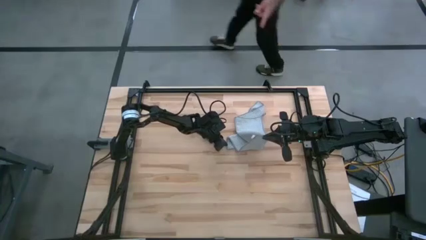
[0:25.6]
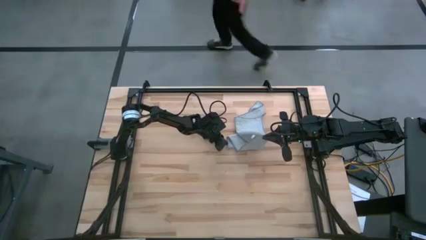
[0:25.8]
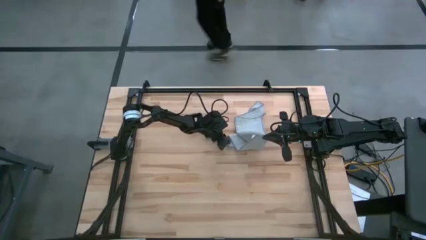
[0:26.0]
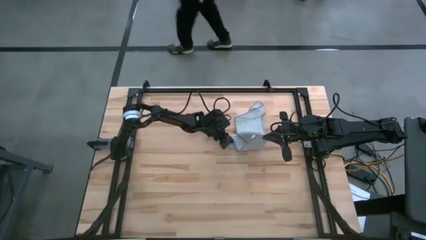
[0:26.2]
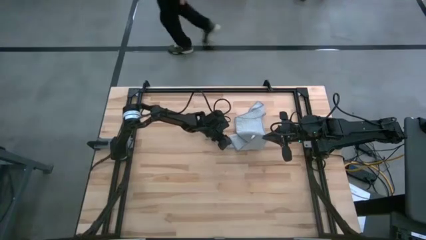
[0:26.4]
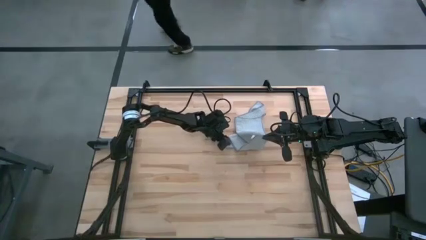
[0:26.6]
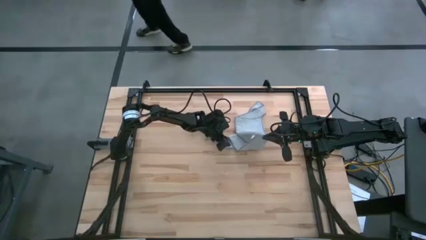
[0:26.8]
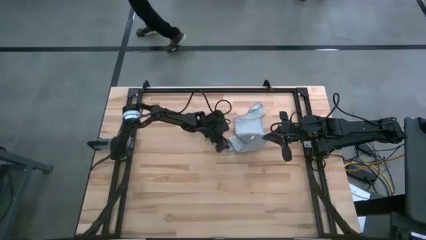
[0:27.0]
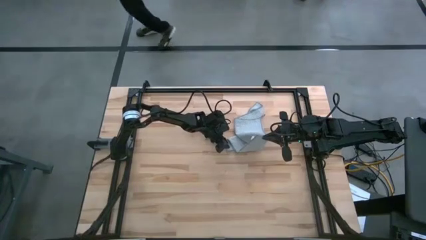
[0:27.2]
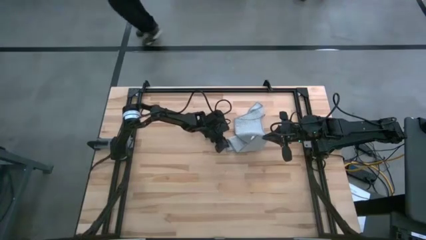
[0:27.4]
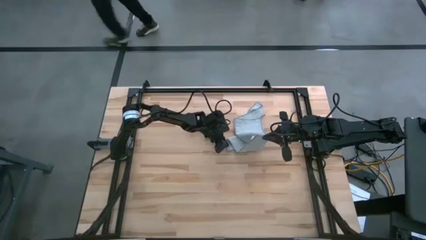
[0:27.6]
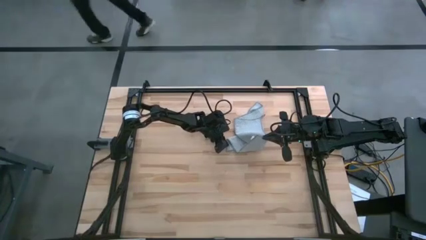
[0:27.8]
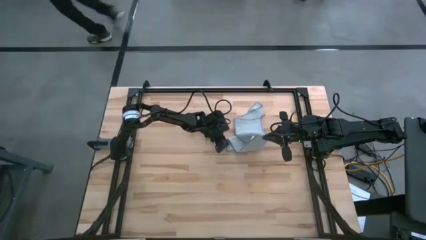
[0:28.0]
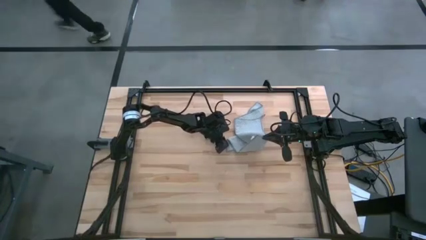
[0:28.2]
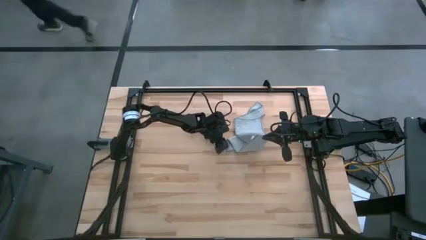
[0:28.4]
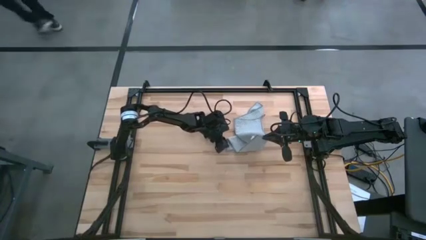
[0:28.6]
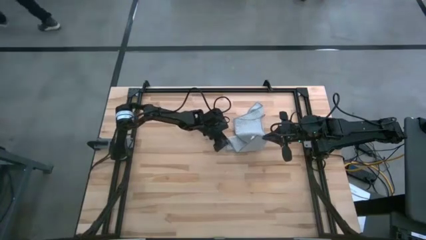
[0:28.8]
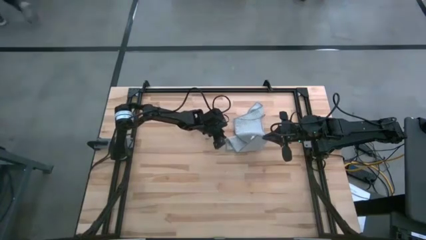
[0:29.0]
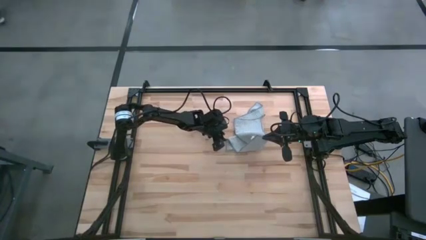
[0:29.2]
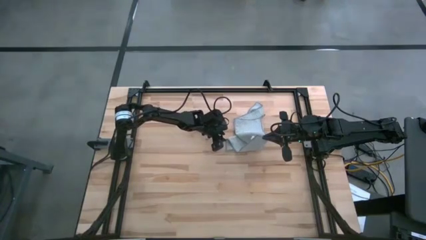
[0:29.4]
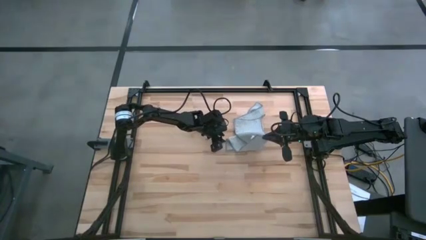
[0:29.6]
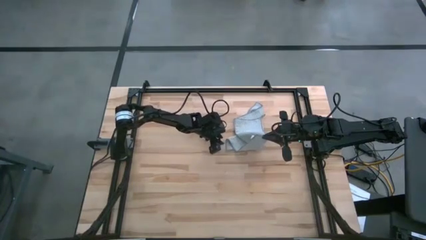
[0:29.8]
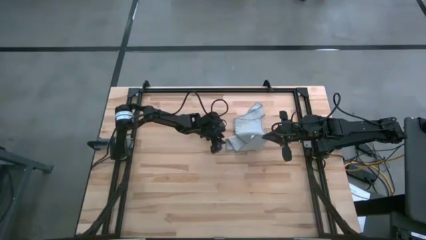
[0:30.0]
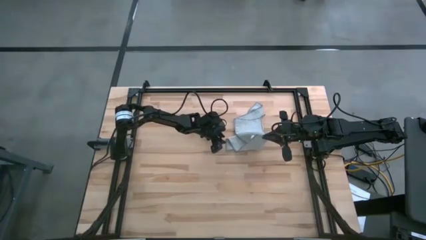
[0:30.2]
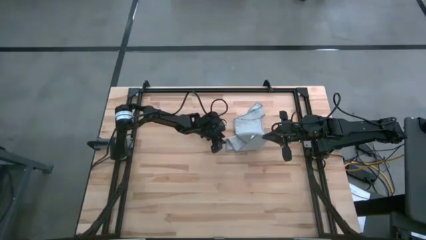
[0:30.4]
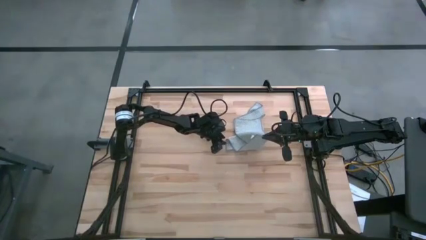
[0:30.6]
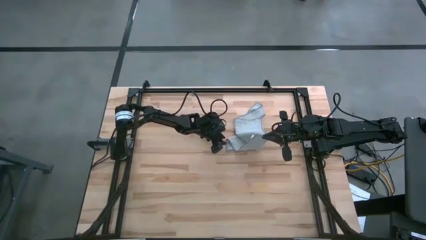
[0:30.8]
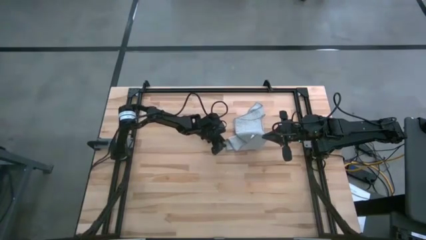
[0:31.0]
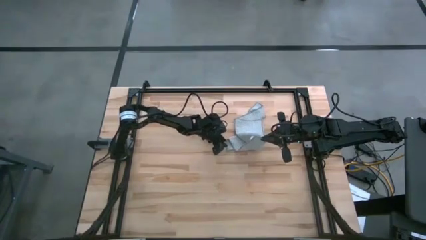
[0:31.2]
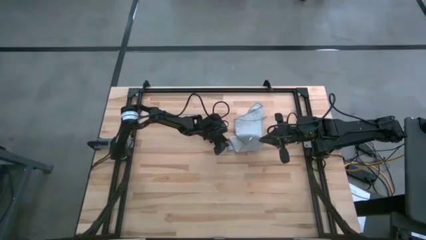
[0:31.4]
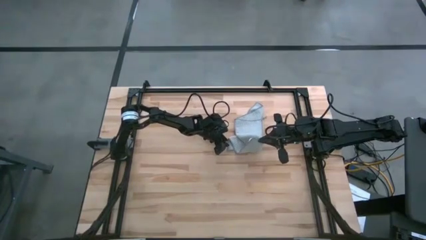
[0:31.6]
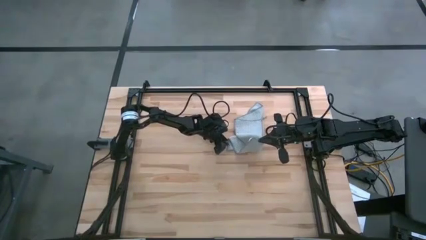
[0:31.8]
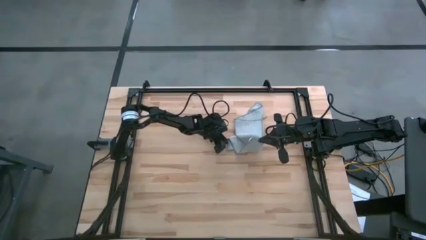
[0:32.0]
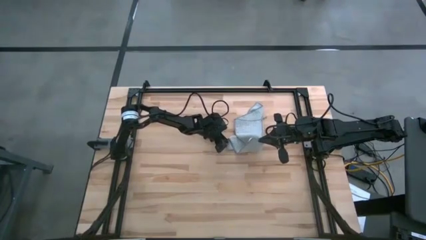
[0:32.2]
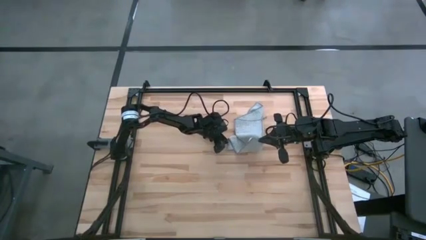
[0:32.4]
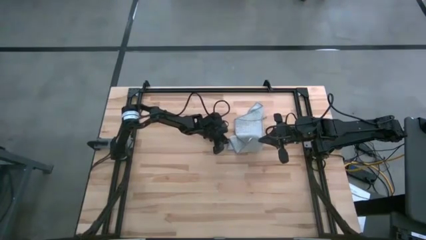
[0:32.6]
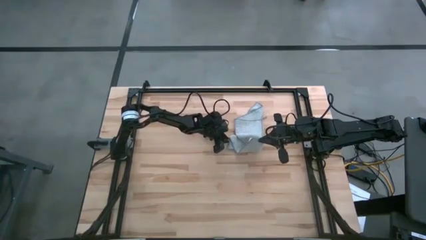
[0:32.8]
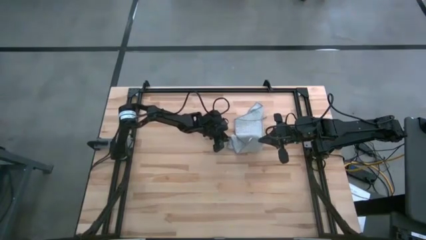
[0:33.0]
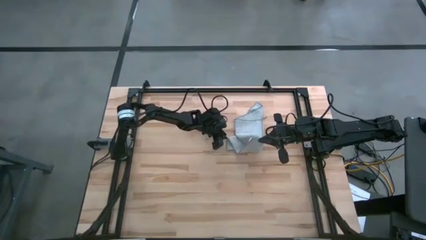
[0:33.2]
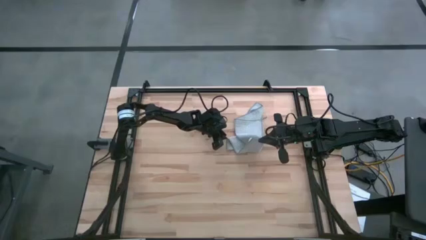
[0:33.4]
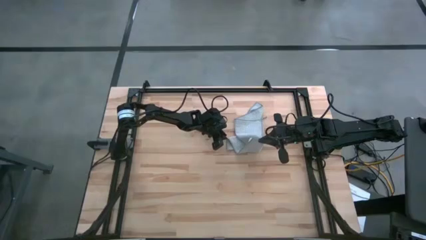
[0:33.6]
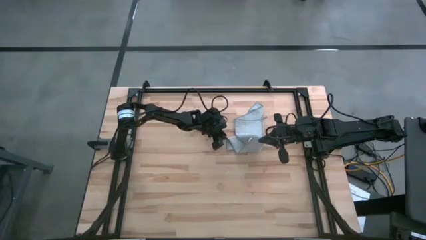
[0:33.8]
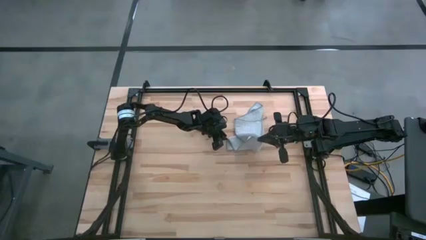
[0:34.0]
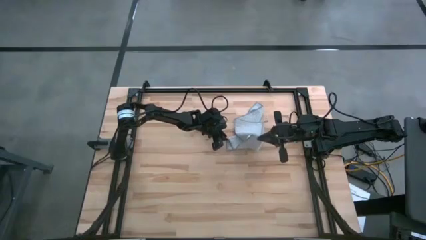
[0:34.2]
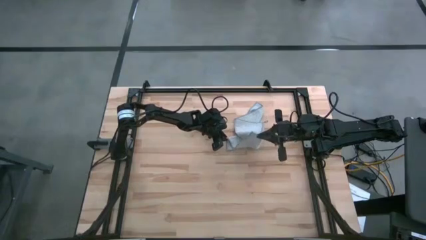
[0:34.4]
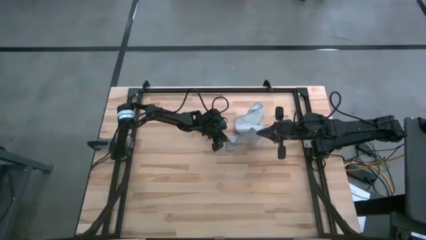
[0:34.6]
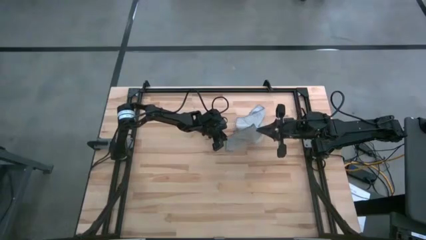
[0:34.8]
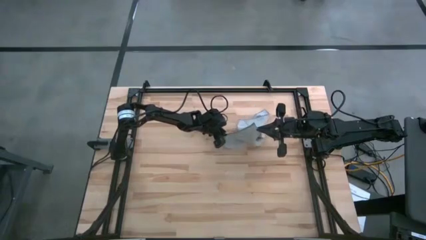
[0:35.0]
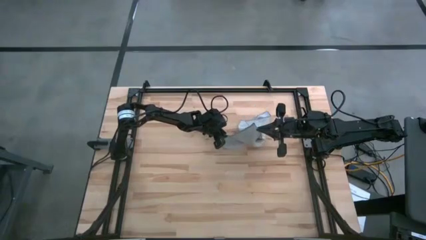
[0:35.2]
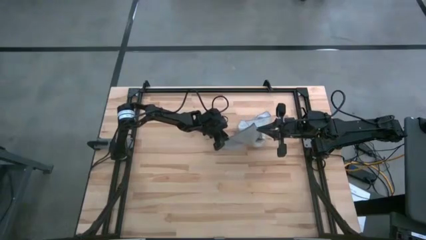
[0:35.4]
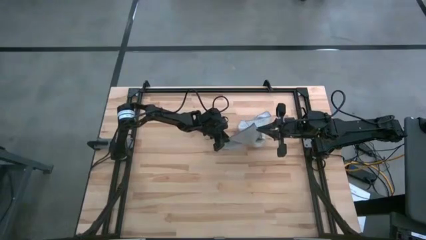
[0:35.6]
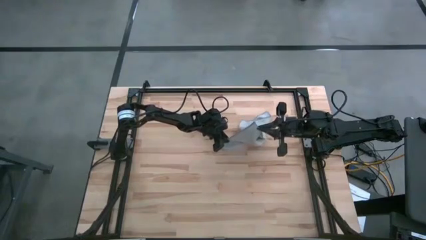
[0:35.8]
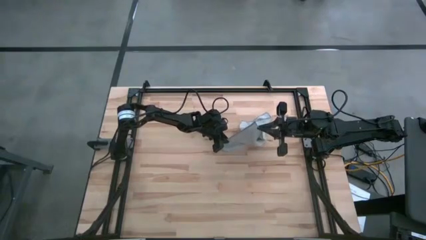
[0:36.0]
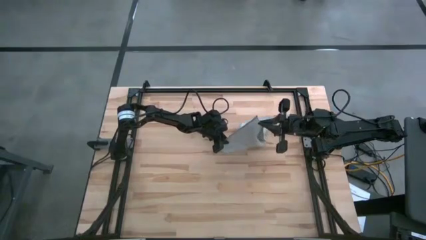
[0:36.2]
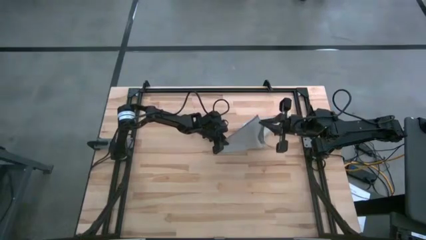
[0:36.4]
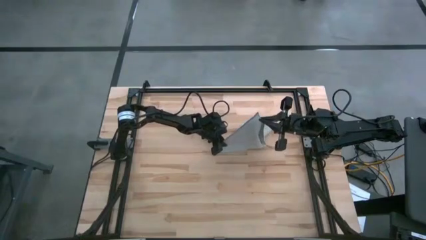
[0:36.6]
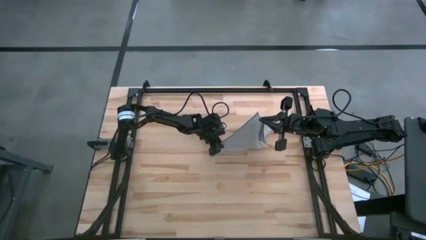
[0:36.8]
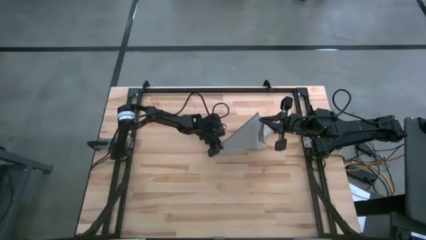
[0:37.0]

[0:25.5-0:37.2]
Task: Fold microfiber towels
Fold the gray on the table

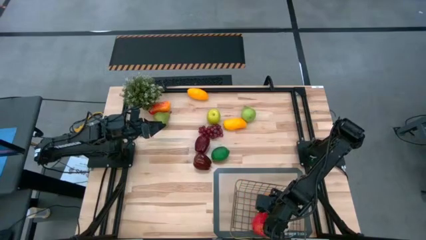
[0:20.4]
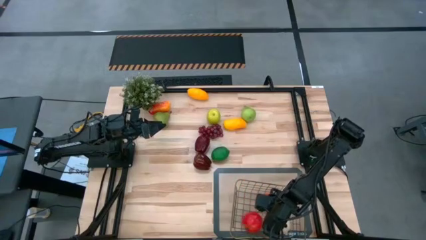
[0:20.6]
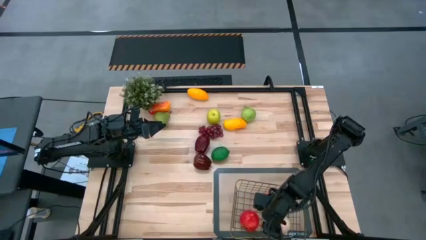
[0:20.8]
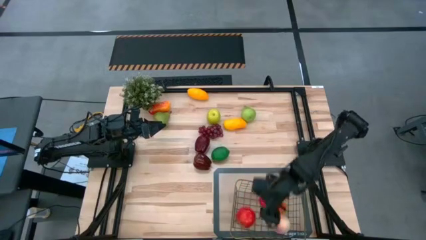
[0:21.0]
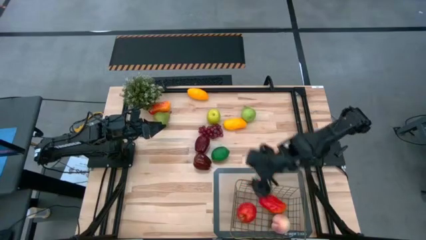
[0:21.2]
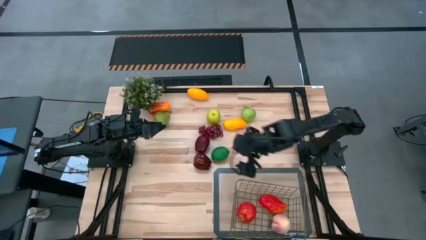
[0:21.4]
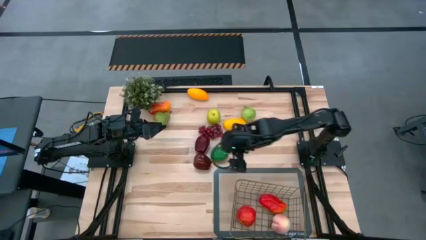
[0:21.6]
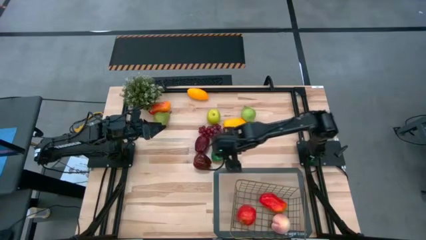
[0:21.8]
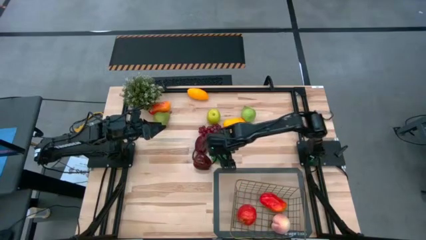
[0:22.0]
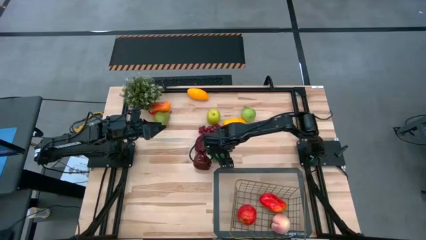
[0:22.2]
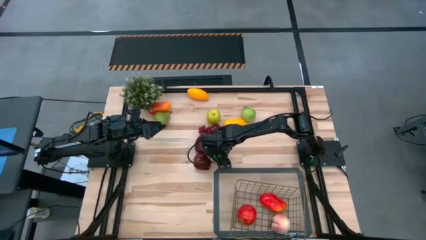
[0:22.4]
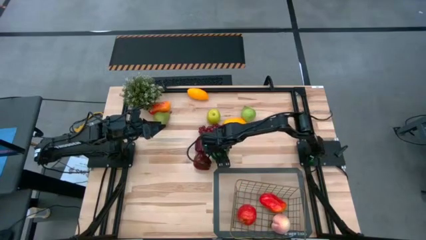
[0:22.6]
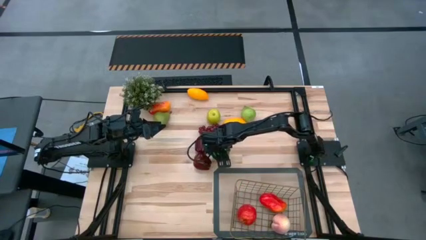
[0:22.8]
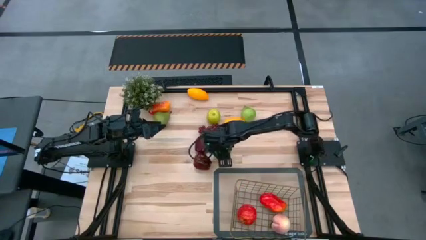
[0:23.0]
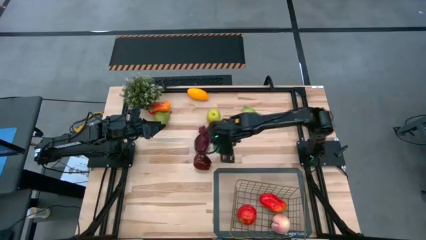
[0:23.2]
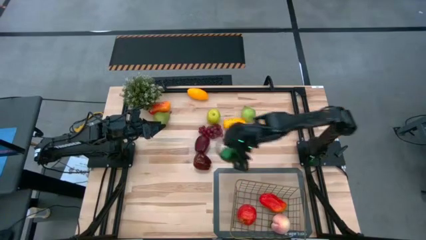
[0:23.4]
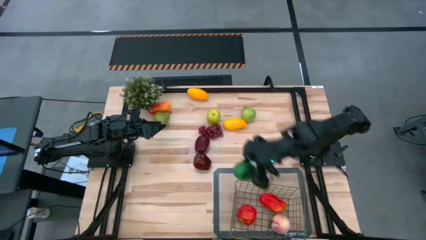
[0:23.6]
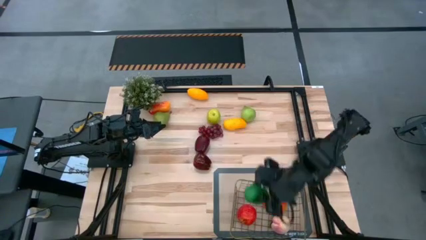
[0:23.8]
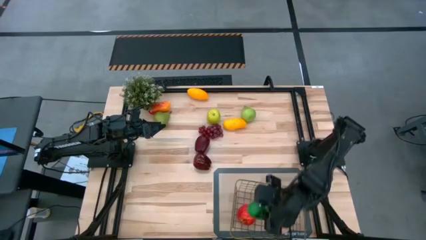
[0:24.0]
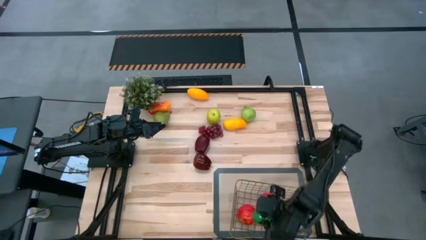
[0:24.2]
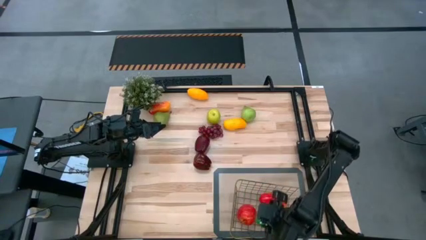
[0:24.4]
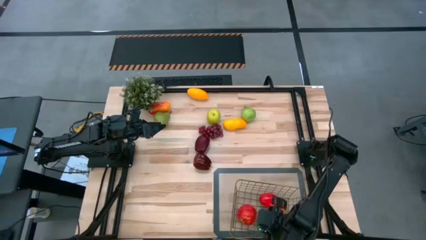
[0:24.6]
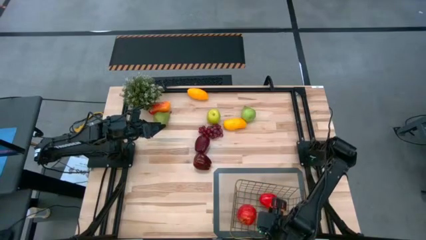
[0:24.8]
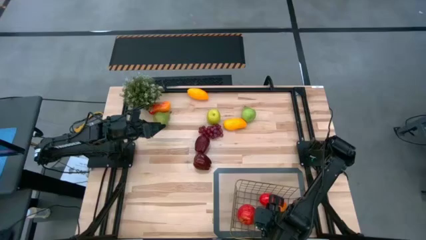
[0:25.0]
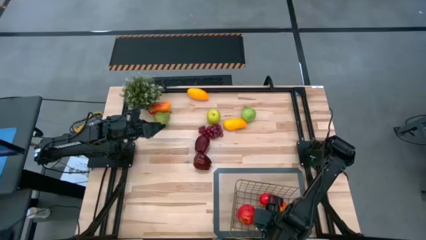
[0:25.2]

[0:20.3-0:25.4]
Task: Build produce basket
Put the lime into the basket

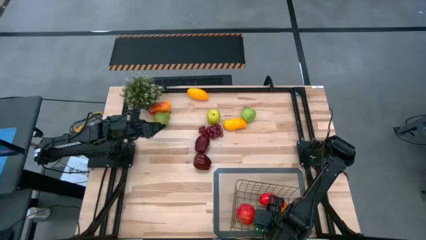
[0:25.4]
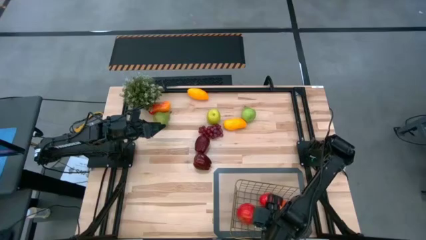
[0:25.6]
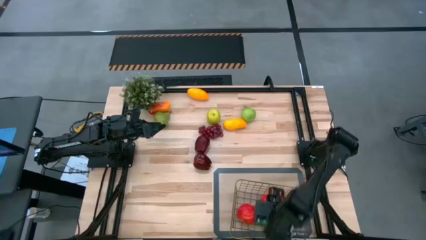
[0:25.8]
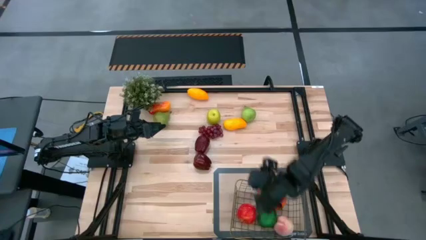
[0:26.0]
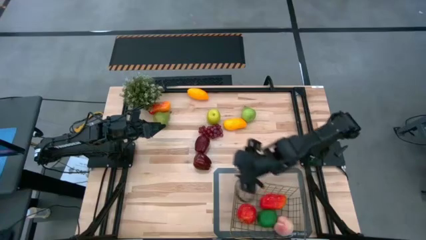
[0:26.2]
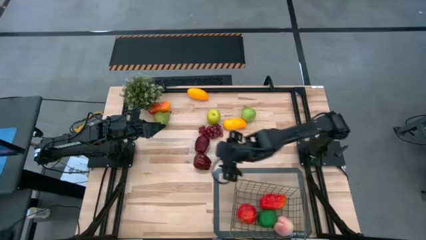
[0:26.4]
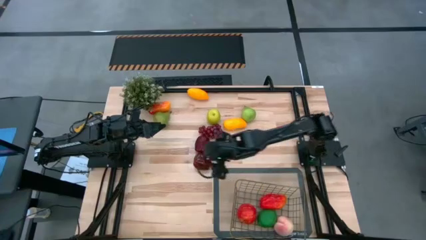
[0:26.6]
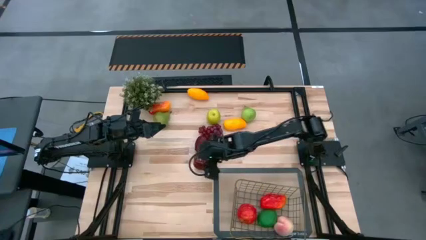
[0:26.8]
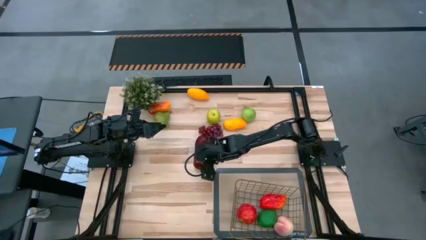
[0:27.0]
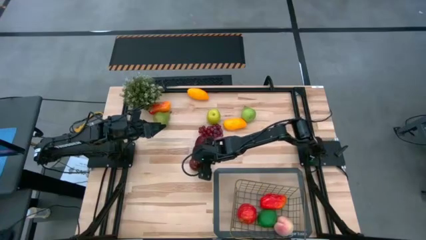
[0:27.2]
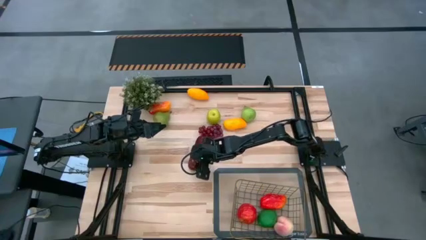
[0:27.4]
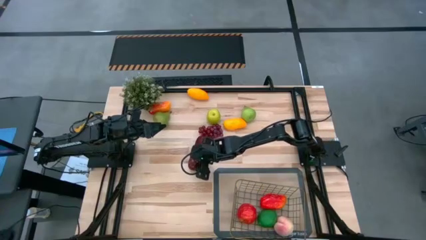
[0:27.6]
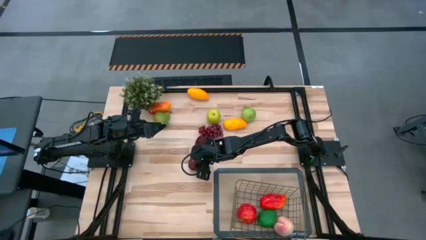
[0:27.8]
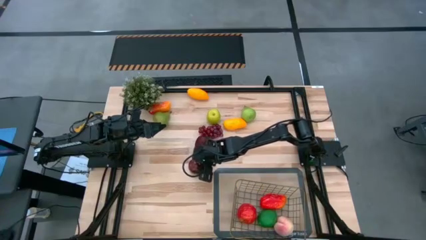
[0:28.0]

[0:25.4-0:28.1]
Put the bottom dark red apple into the wire basket
